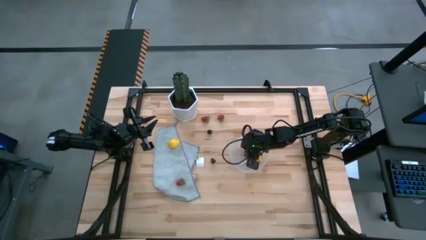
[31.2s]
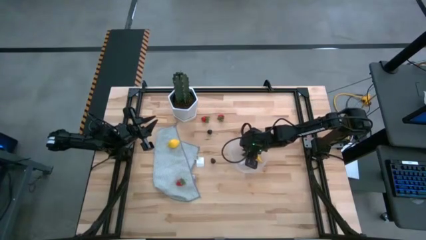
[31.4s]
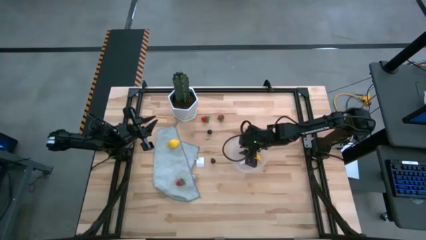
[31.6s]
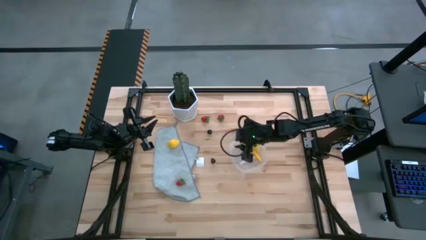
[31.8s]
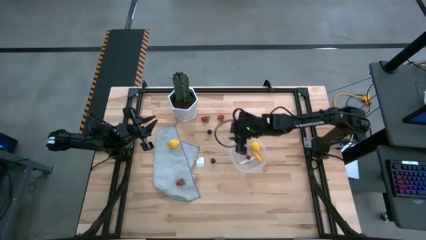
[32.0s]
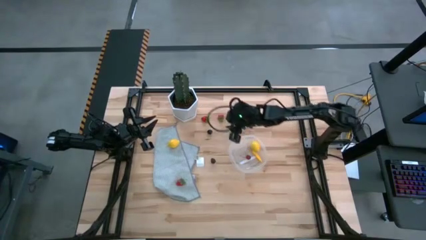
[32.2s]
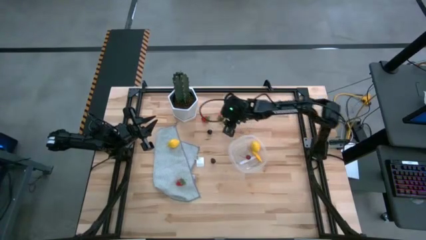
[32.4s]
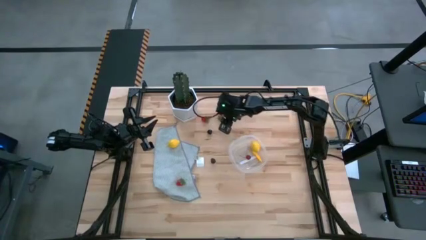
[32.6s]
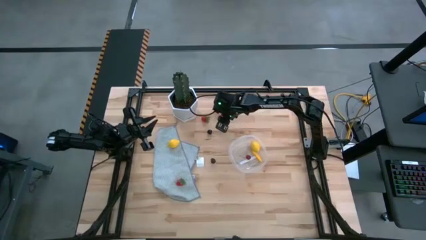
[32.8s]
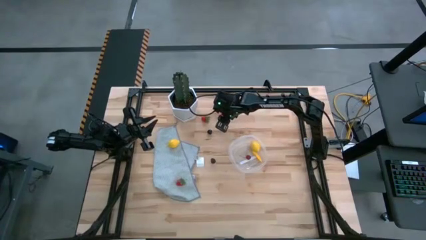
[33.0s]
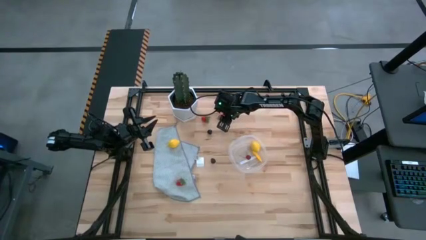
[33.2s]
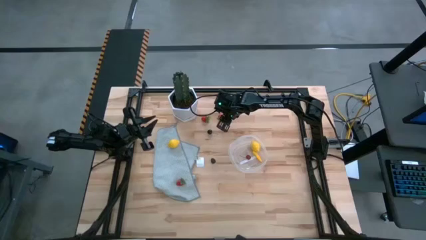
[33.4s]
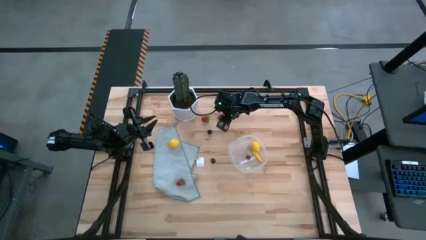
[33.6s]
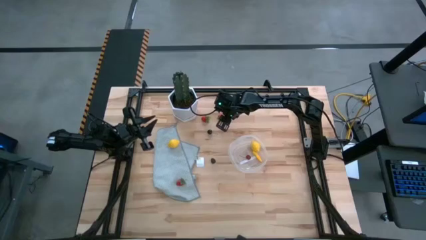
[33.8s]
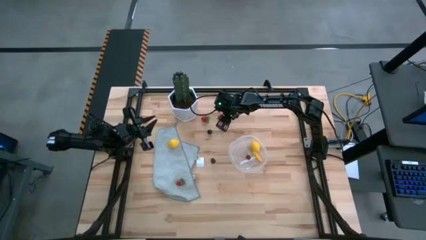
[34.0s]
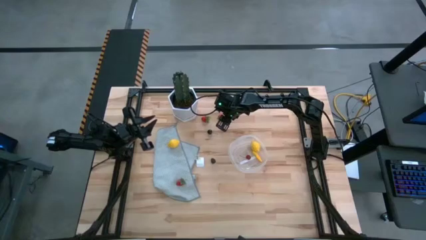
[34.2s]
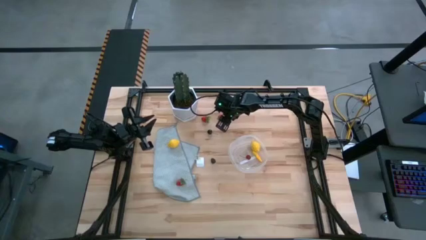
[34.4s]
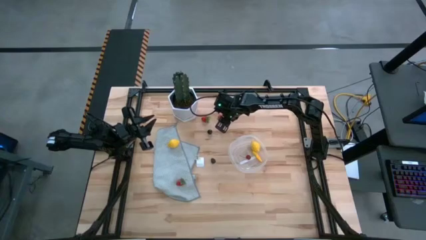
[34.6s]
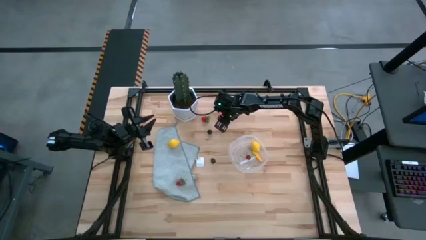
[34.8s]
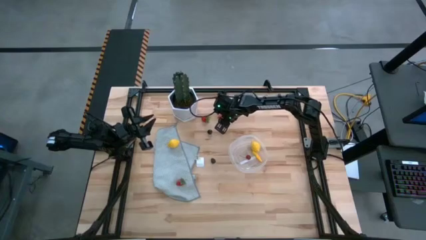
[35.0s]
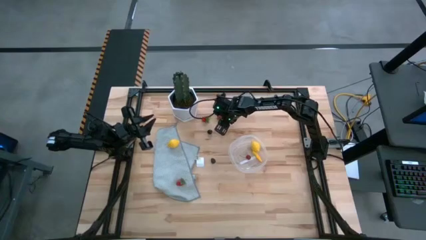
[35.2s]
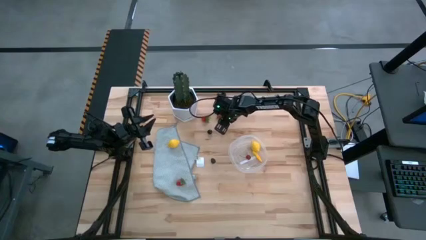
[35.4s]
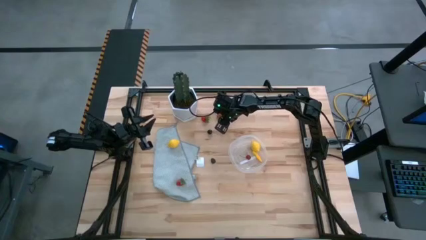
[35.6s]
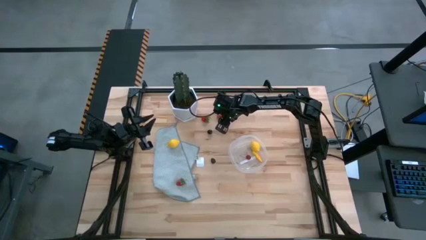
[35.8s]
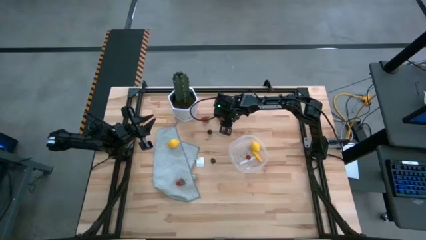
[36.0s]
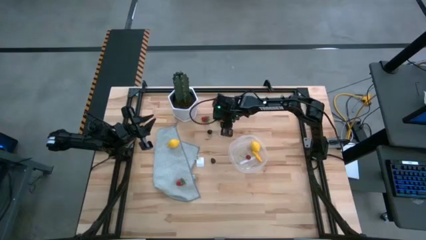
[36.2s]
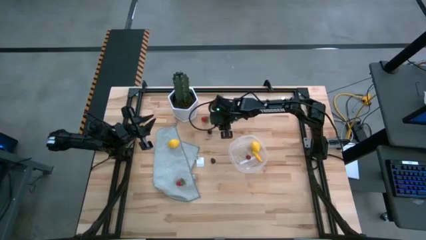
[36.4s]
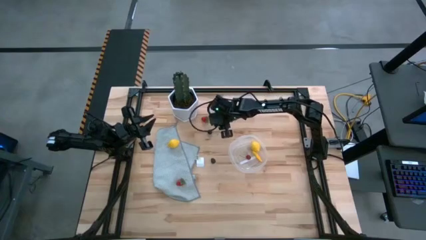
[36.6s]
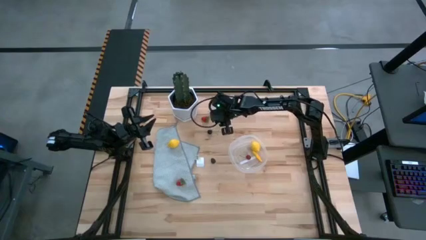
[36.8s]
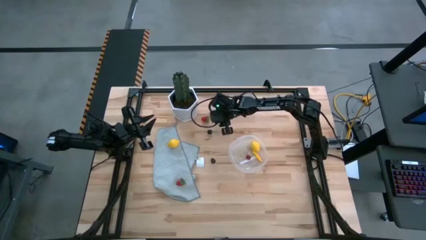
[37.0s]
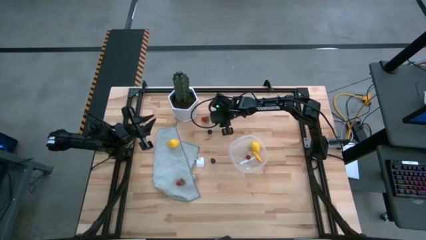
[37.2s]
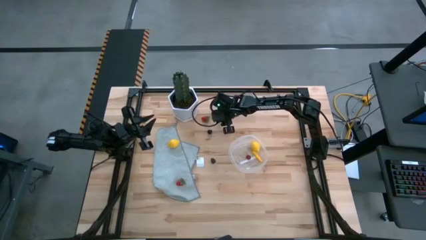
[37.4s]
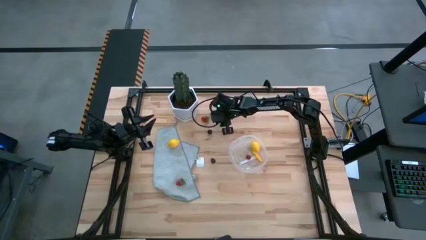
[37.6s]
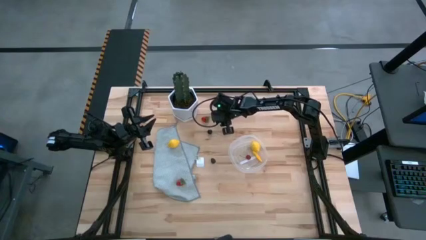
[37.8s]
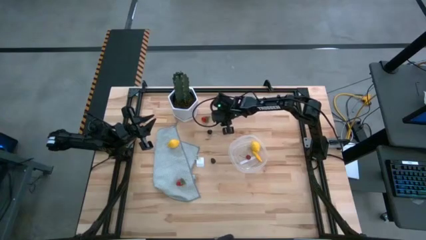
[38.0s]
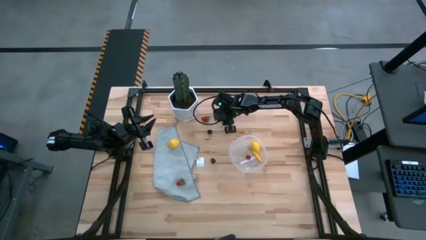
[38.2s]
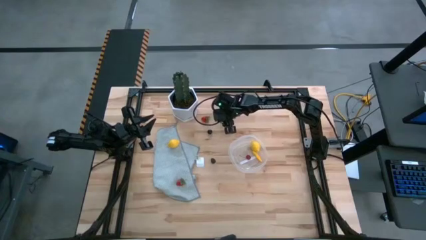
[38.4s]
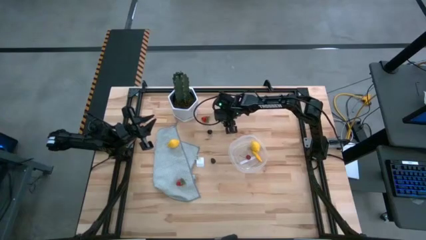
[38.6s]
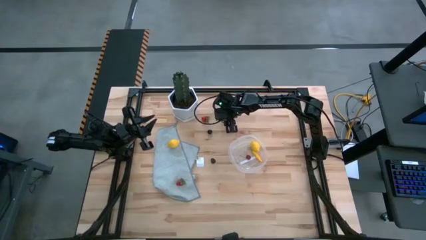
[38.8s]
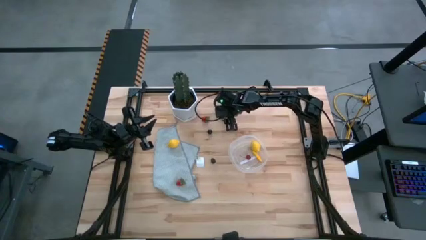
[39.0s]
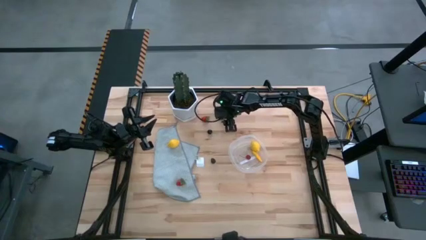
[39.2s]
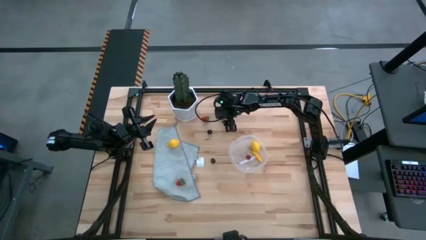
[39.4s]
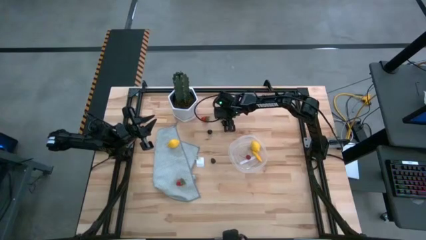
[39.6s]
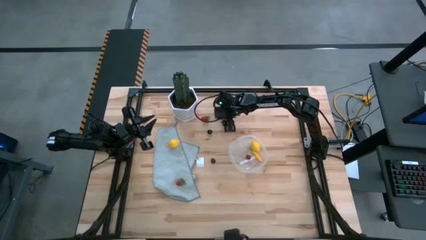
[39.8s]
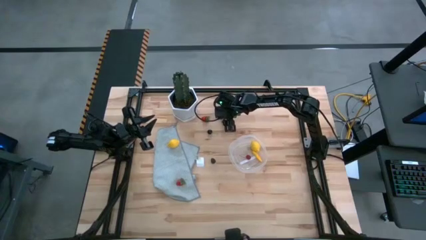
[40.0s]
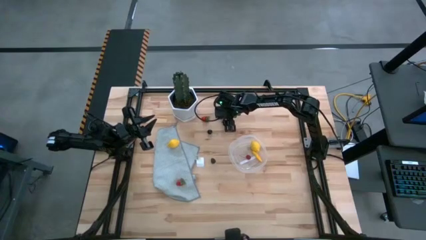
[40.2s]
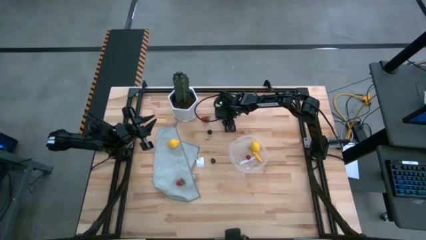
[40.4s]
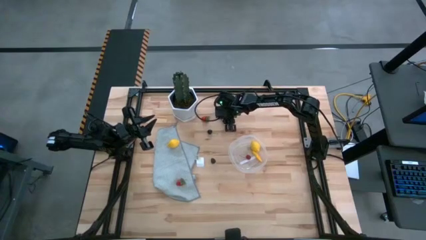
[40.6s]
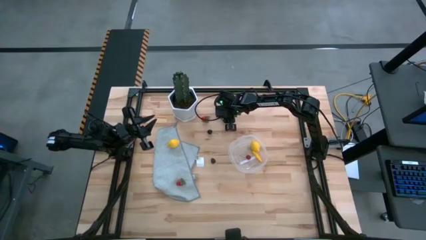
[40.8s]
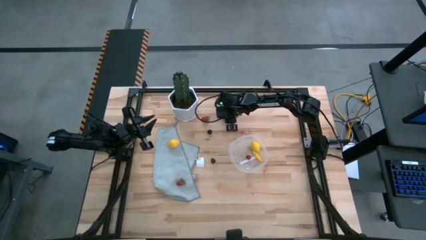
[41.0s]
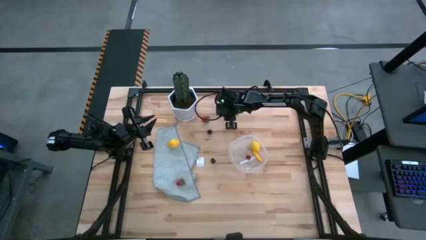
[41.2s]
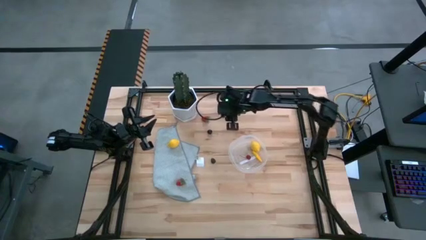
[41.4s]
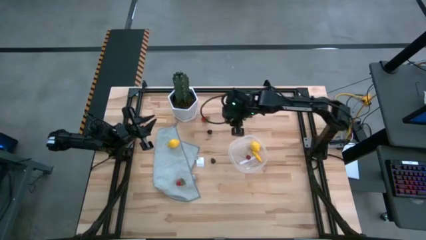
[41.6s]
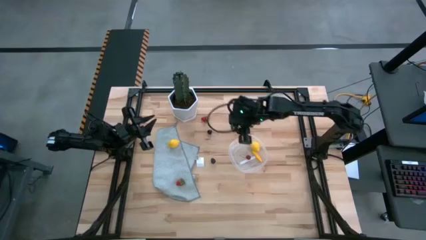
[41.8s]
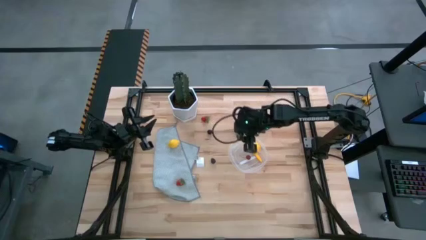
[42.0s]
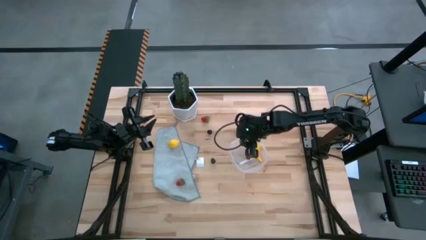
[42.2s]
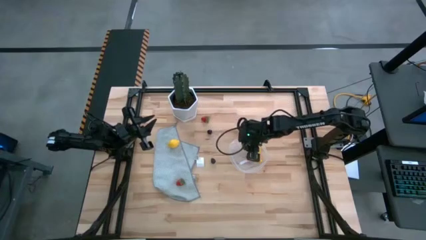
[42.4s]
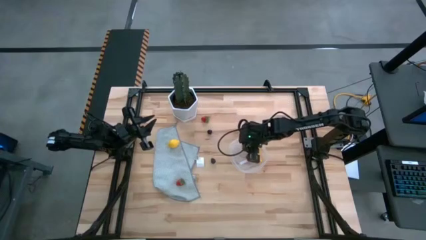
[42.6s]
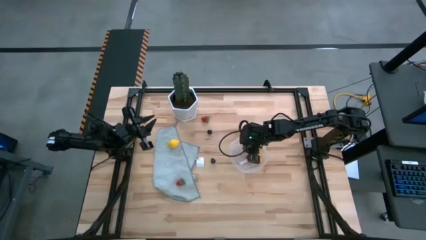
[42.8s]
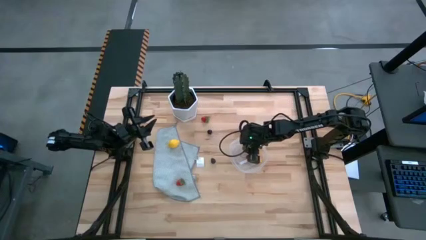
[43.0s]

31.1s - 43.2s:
Task: Pick and placing Produce into tupperware
Put the top right red strawberry into the transparent container

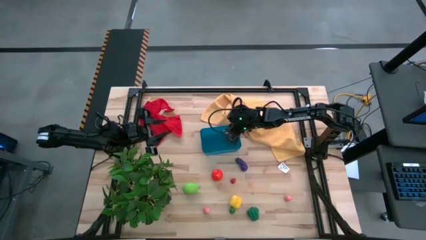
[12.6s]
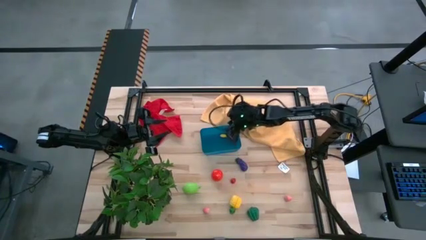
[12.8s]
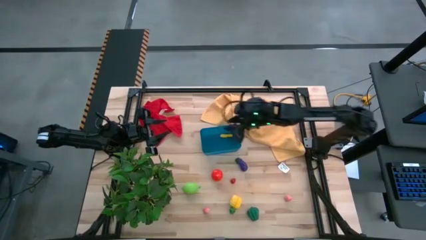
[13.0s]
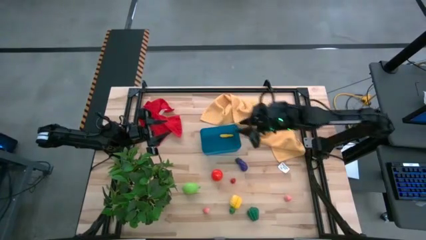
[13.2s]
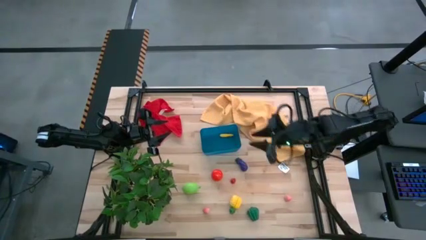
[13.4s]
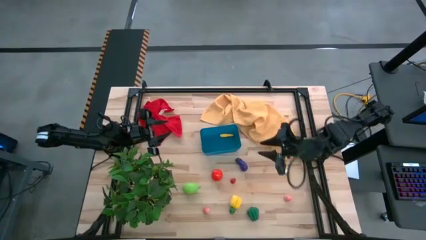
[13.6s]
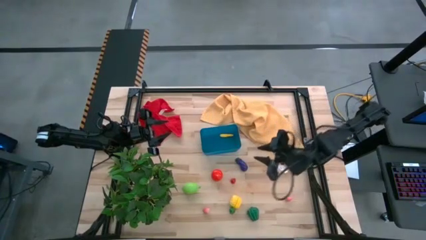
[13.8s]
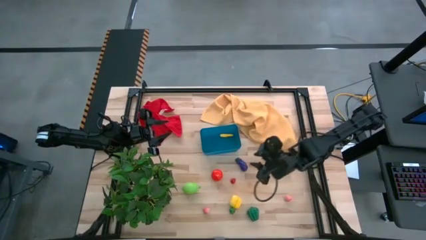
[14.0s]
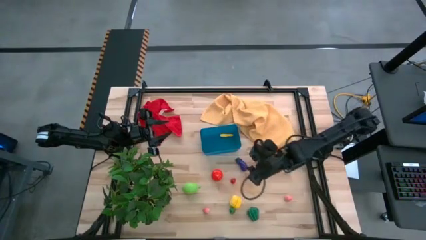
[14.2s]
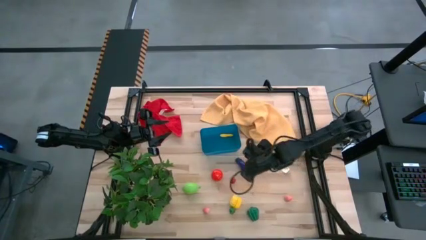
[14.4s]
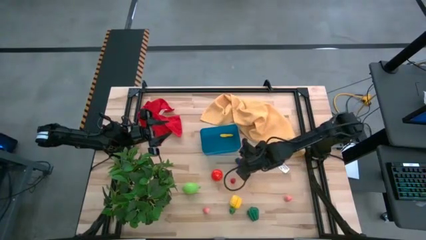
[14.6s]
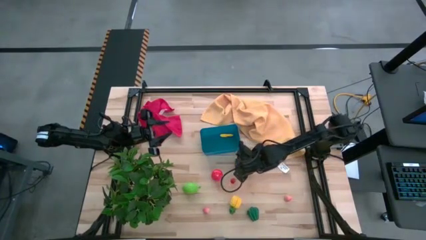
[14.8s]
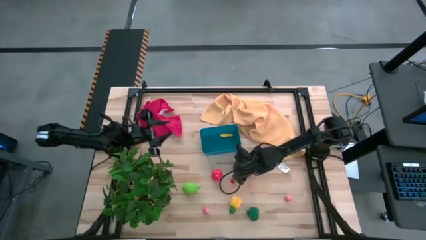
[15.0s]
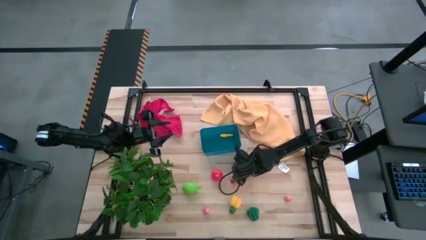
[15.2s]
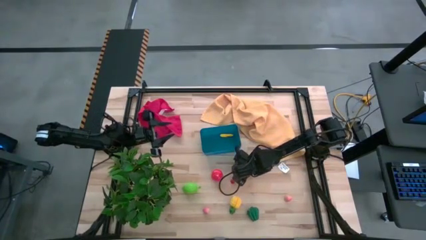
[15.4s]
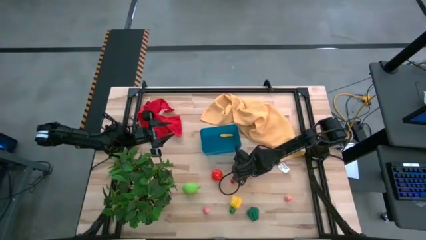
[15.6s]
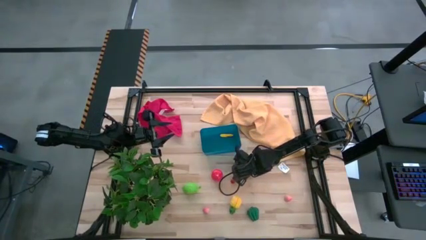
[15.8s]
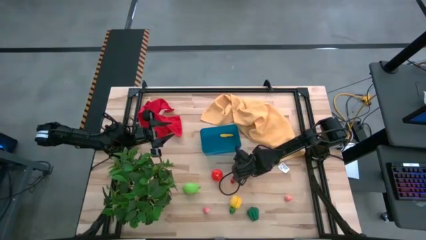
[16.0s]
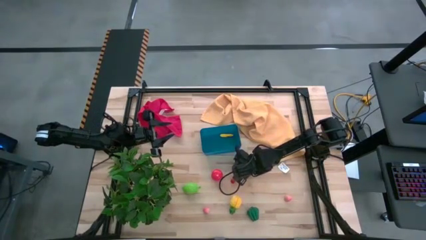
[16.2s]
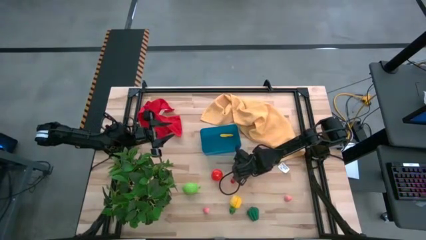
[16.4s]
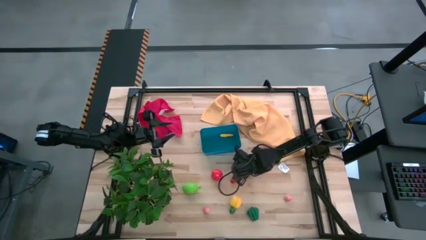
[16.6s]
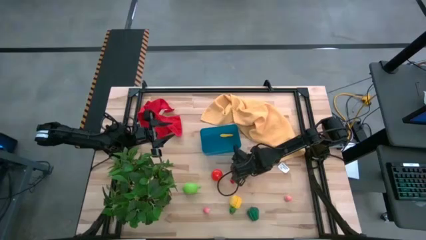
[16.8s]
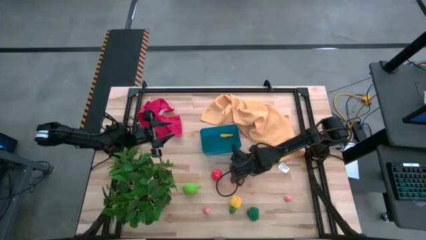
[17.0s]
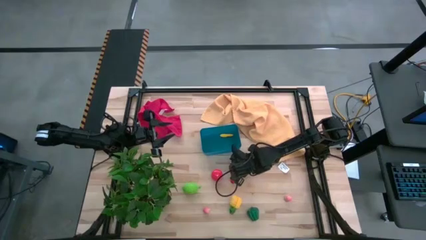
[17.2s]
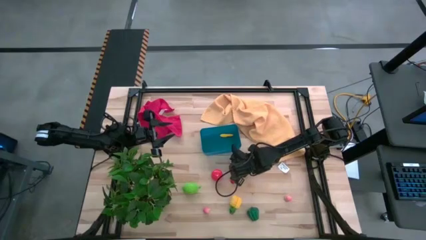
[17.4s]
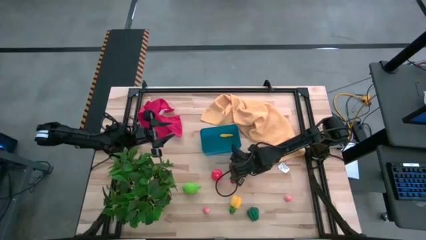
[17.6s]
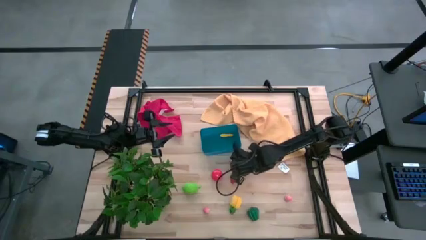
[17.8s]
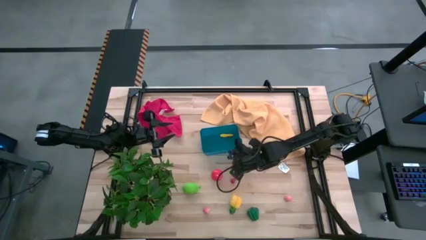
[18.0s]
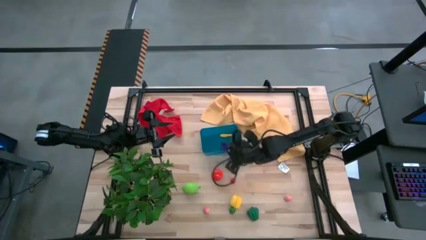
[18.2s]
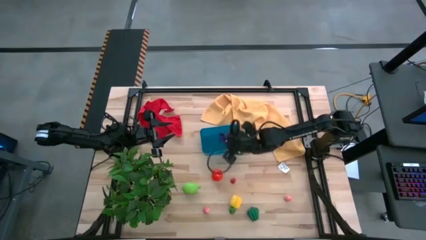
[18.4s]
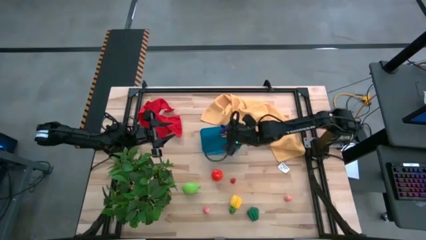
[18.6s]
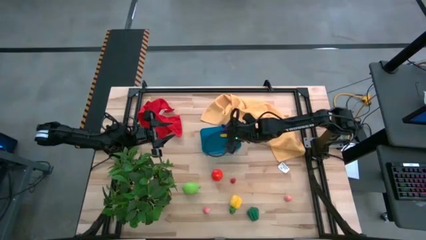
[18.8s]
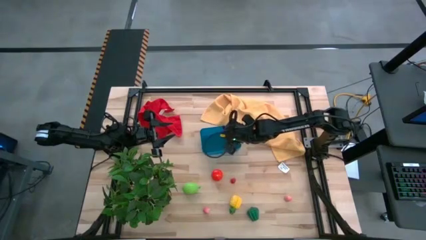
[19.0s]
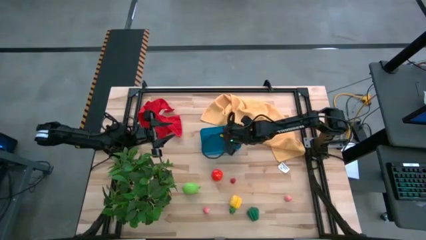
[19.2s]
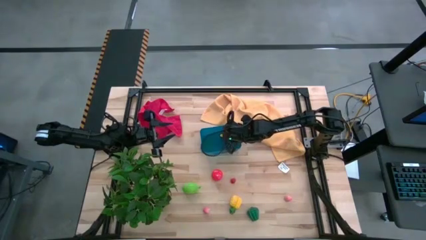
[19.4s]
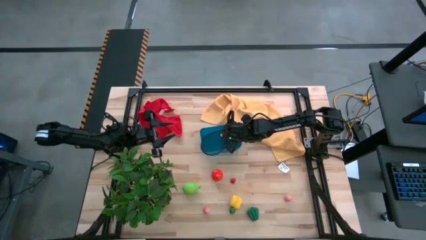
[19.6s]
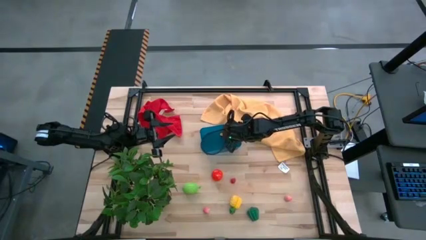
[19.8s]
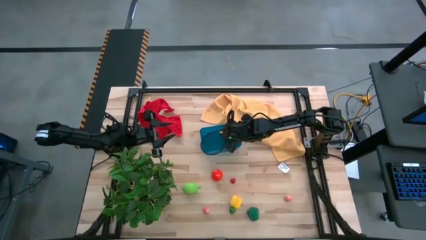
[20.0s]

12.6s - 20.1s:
Task: Pick and placing Produce into tupperware
Put the purple eggplant into the blue bin
